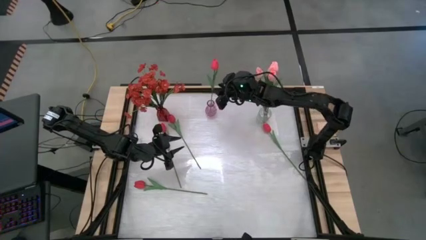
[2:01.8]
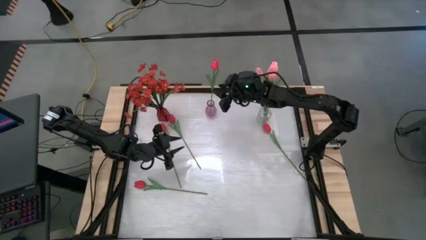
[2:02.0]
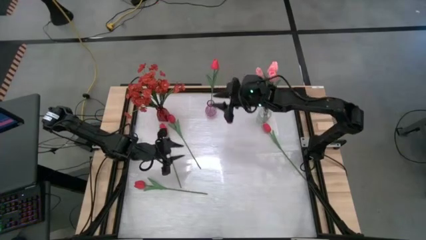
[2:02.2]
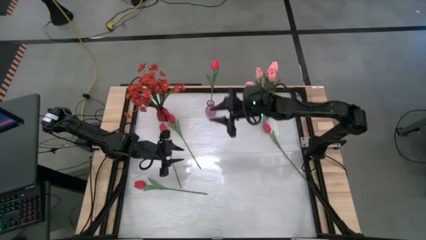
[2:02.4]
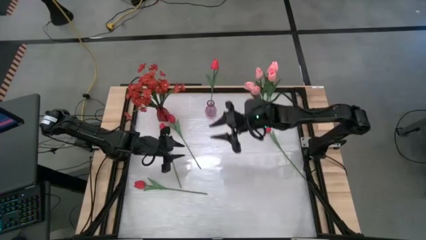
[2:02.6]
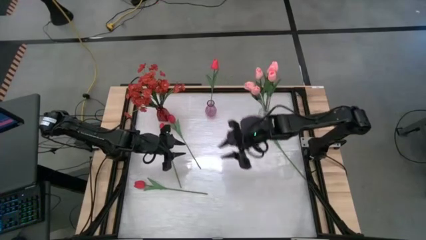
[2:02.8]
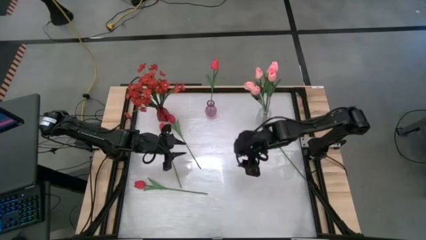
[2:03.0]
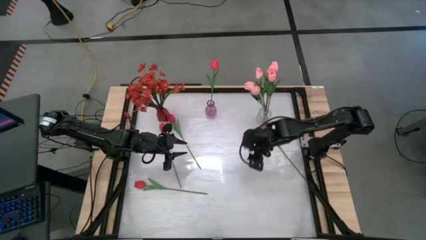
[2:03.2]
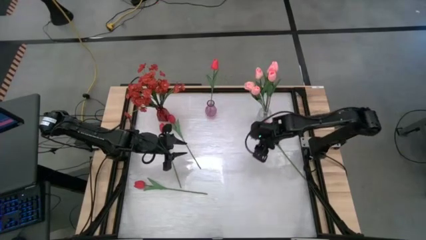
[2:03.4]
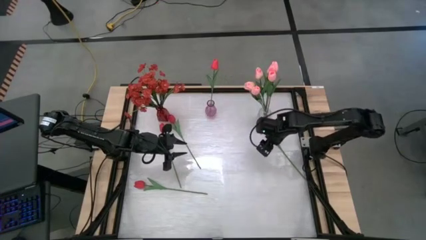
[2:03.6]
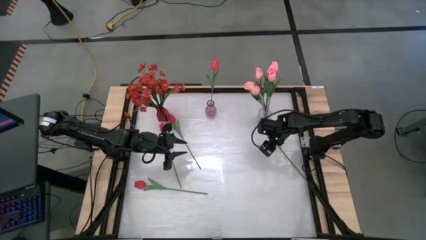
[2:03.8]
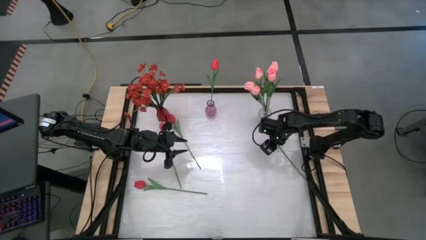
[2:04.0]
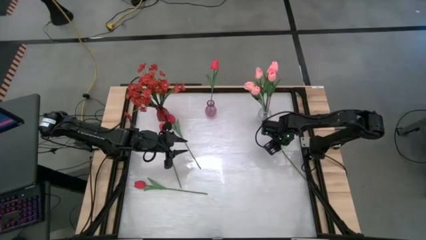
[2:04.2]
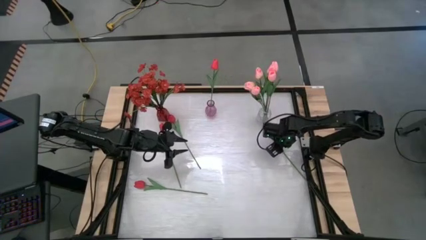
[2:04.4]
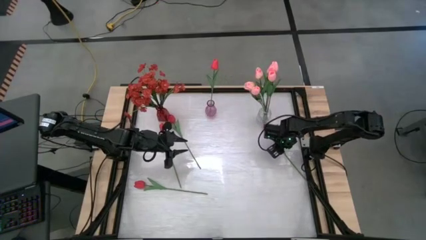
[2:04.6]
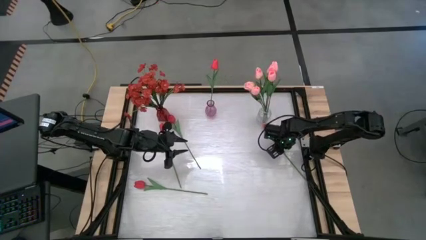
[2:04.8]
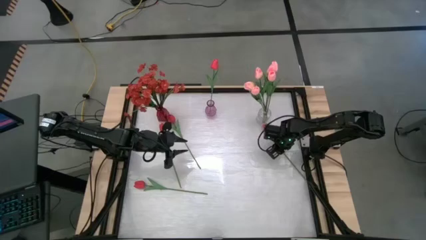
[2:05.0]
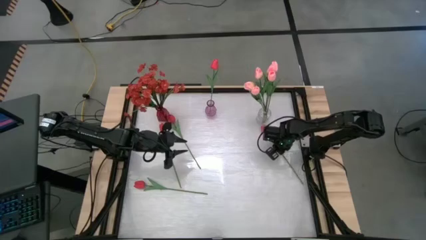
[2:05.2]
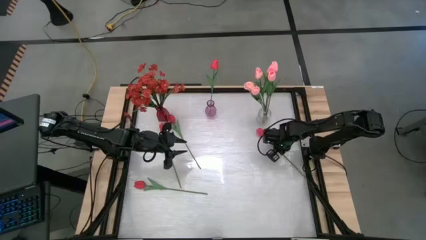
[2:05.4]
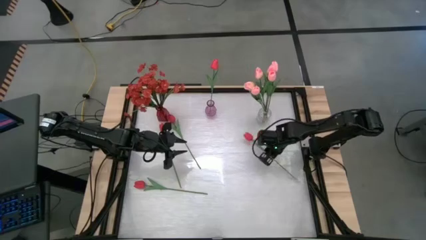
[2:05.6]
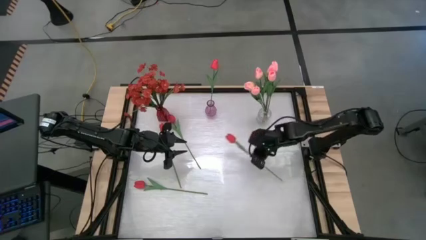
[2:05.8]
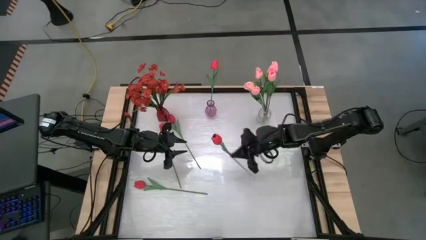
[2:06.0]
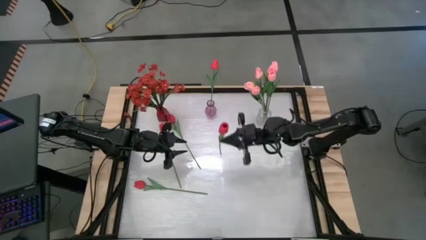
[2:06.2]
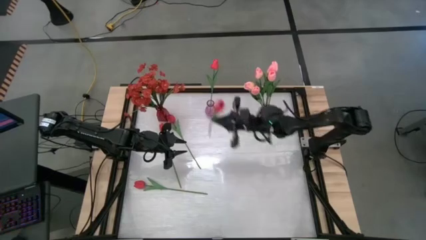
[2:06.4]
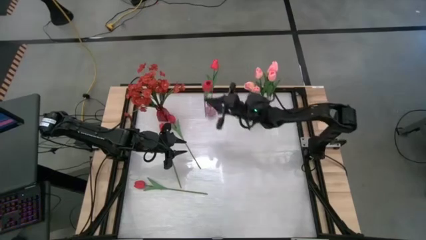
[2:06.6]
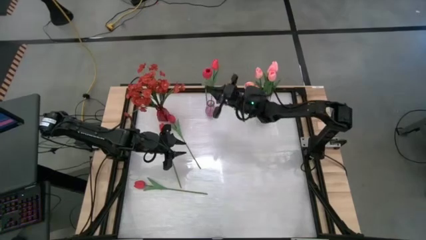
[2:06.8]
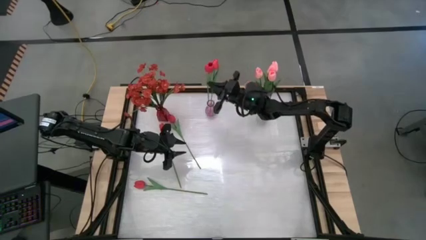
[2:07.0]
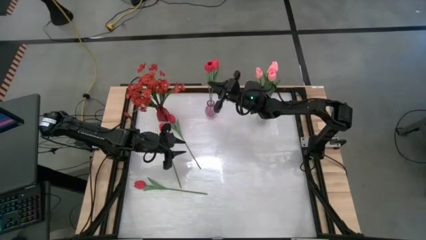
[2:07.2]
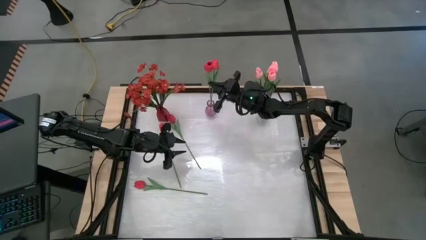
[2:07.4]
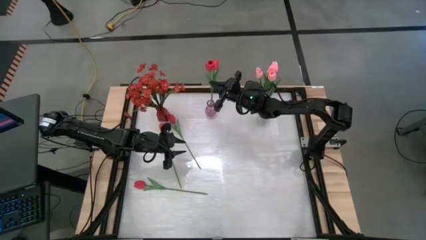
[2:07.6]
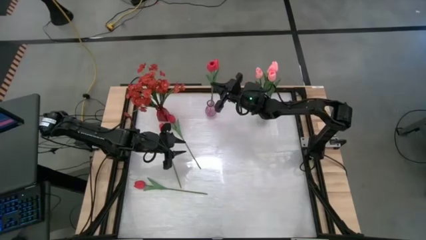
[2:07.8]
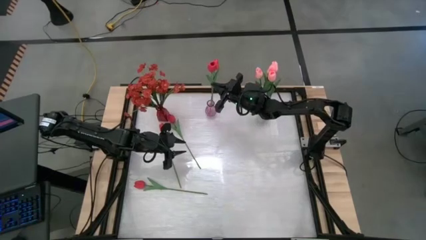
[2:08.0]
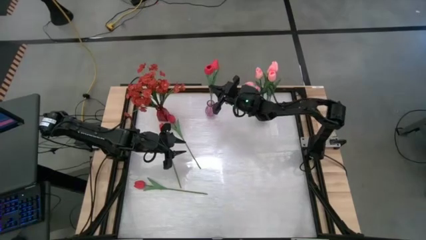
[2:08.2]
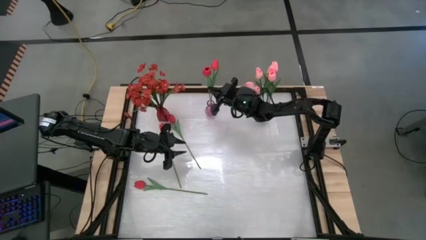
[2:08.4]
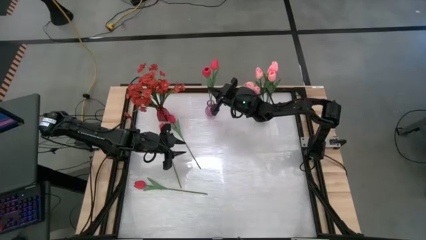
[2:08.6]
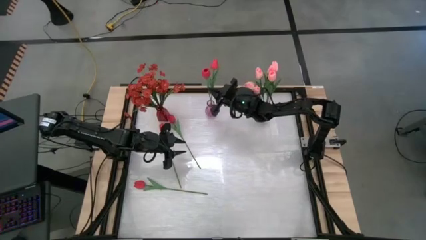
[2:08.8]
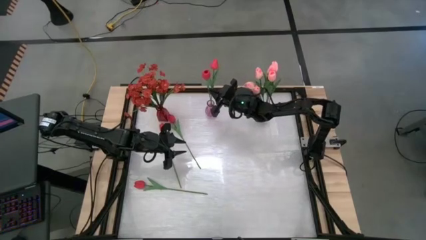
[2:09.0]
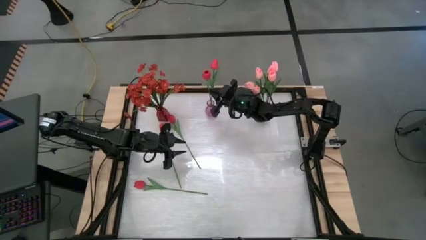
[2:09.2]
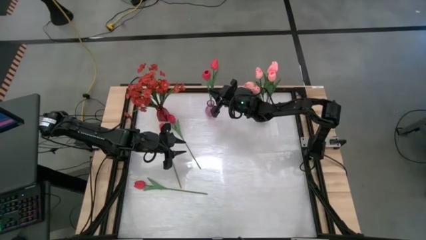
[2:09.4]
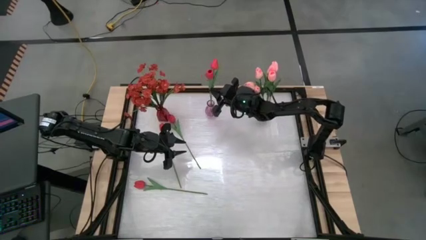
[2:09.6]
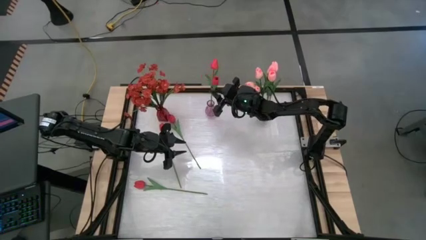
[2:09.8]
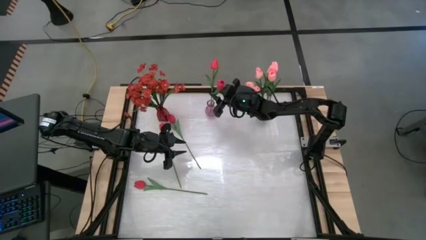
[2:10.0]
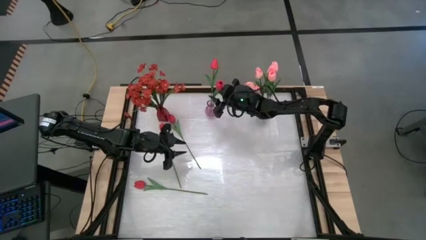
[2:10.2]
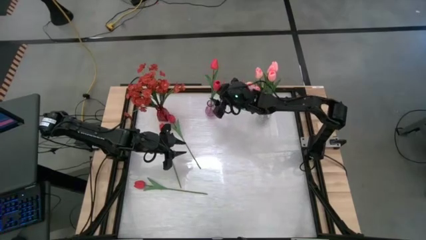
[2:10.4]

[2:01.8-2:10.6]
Task: Sort flowers into vase by color
Put the top right red tulip into the purple vase

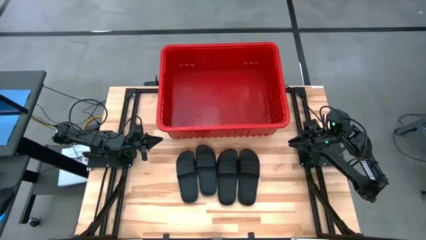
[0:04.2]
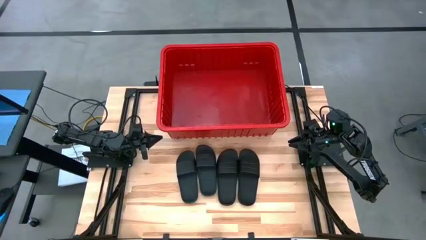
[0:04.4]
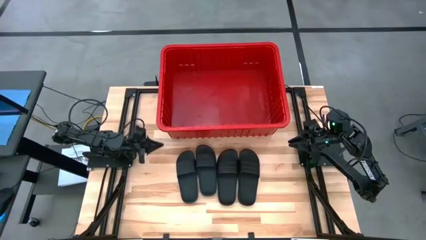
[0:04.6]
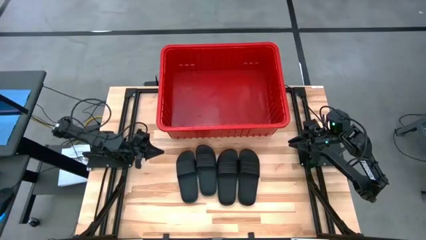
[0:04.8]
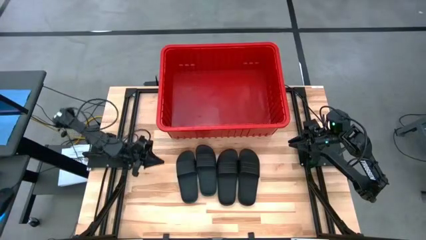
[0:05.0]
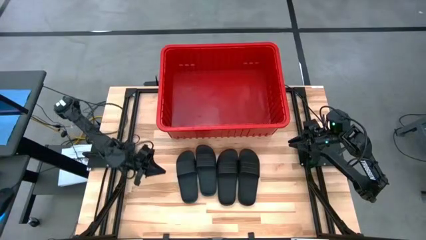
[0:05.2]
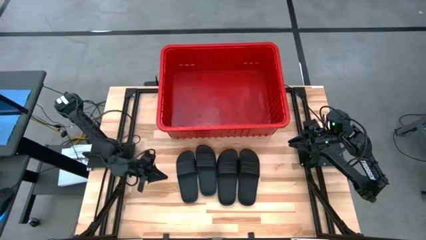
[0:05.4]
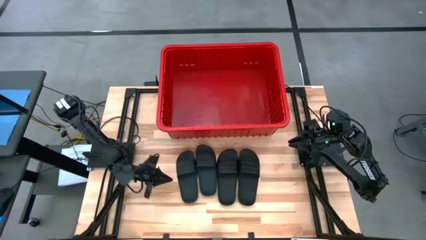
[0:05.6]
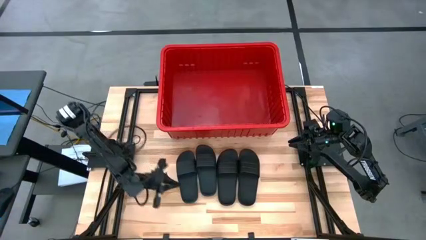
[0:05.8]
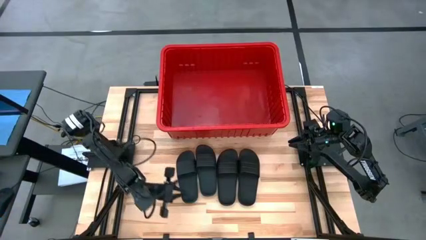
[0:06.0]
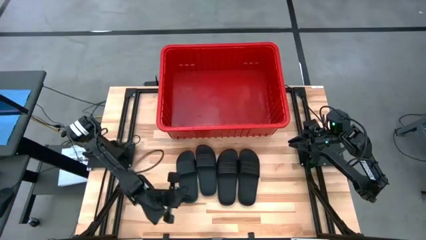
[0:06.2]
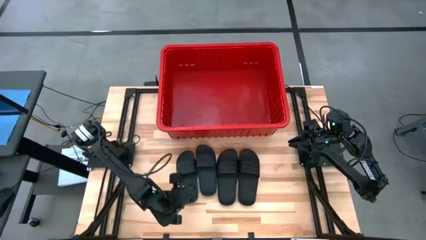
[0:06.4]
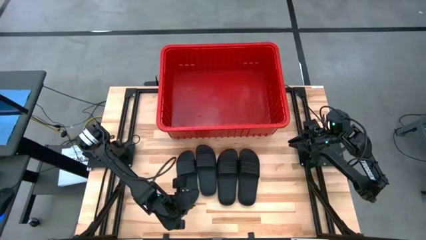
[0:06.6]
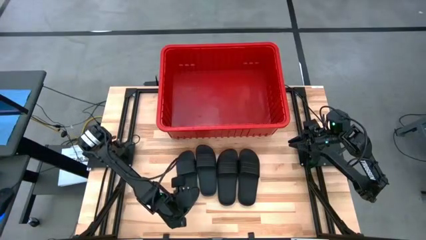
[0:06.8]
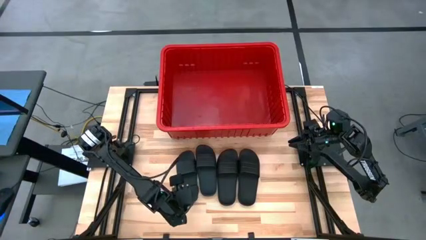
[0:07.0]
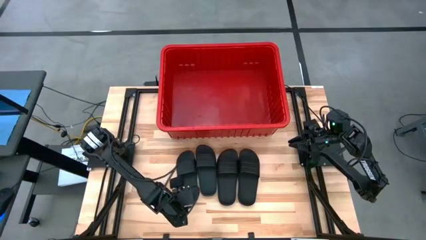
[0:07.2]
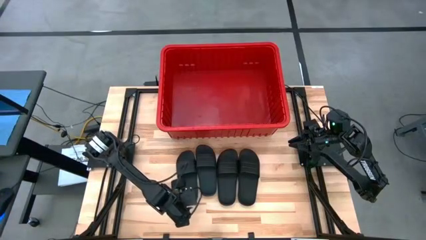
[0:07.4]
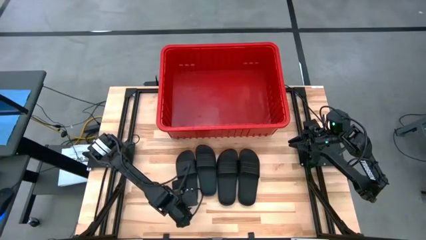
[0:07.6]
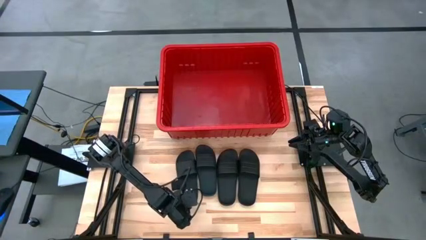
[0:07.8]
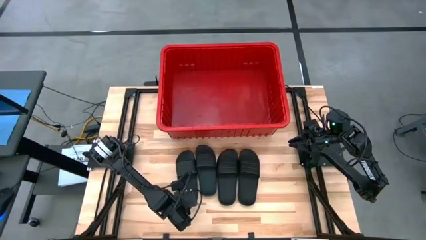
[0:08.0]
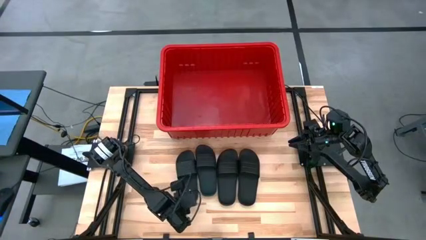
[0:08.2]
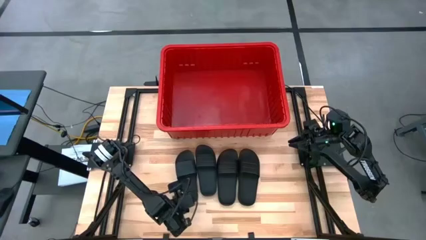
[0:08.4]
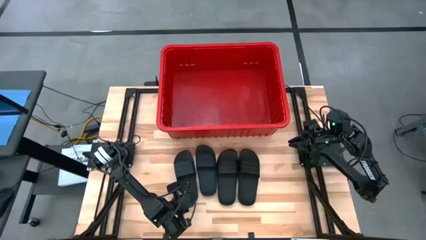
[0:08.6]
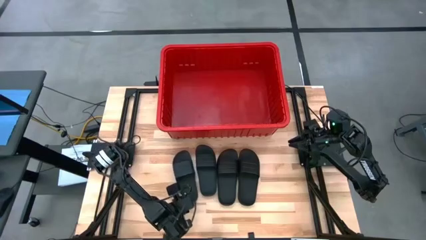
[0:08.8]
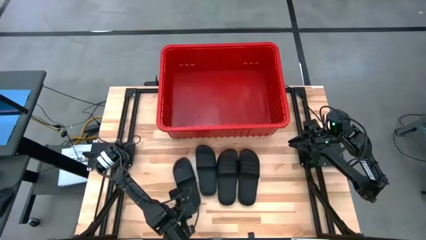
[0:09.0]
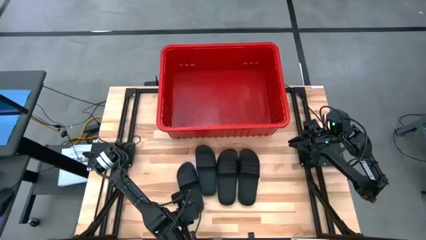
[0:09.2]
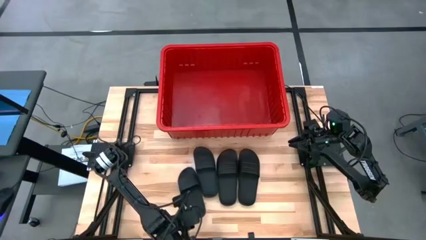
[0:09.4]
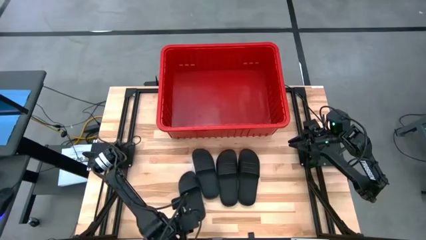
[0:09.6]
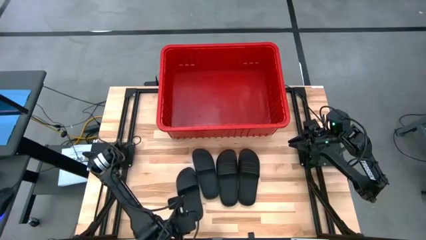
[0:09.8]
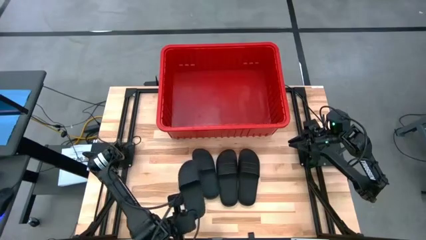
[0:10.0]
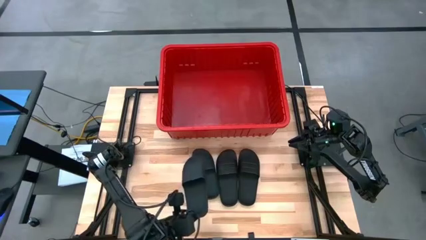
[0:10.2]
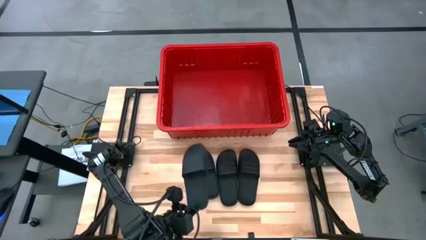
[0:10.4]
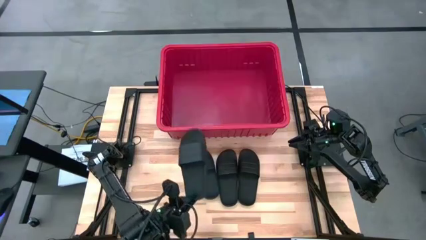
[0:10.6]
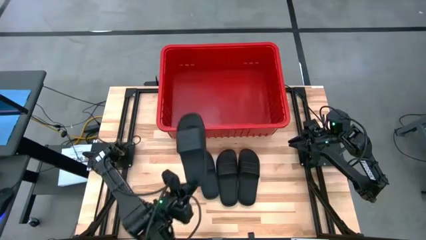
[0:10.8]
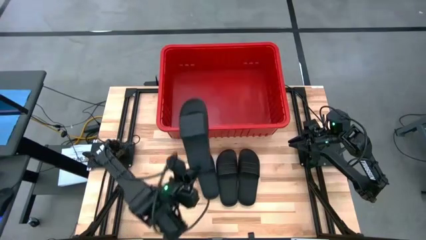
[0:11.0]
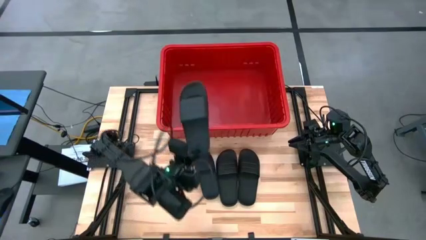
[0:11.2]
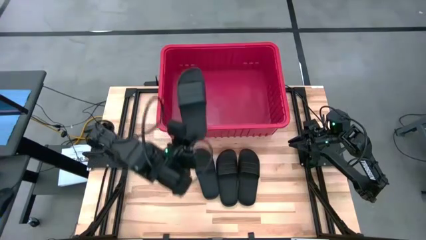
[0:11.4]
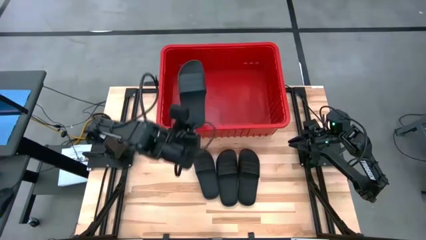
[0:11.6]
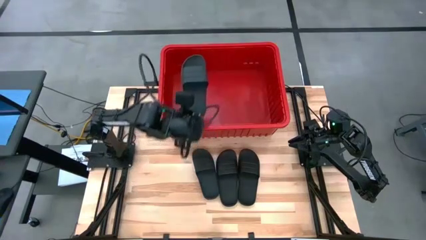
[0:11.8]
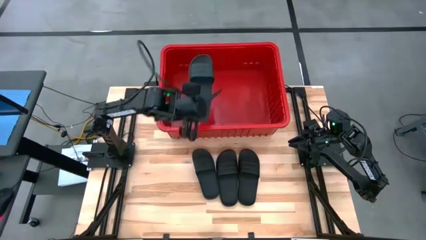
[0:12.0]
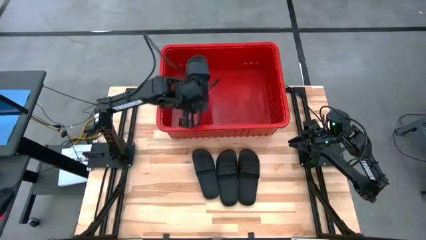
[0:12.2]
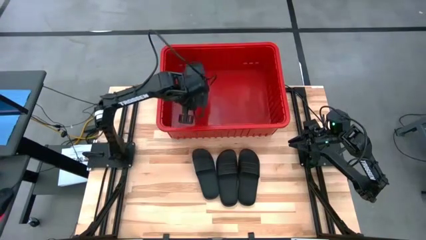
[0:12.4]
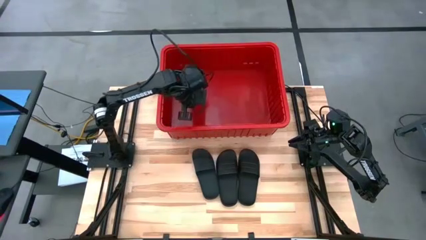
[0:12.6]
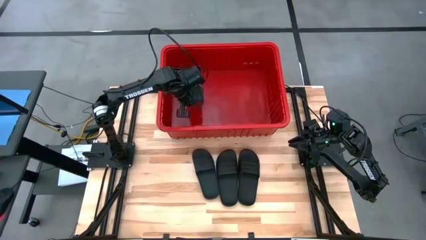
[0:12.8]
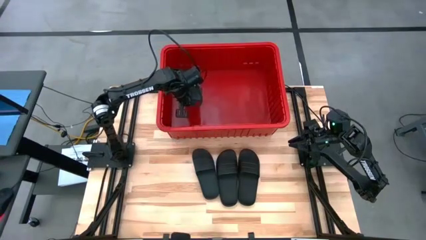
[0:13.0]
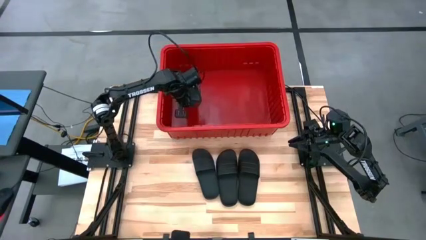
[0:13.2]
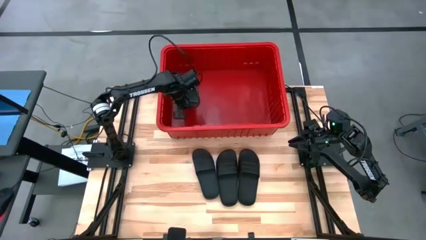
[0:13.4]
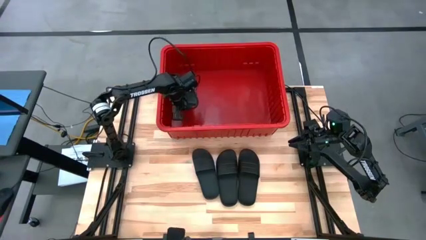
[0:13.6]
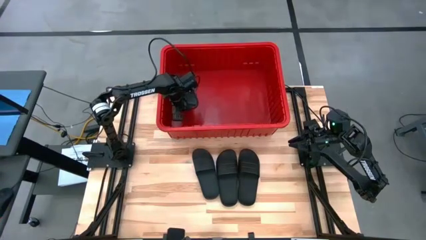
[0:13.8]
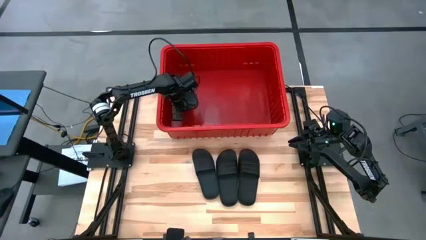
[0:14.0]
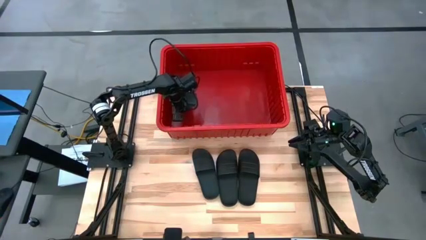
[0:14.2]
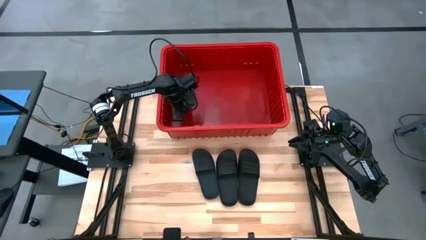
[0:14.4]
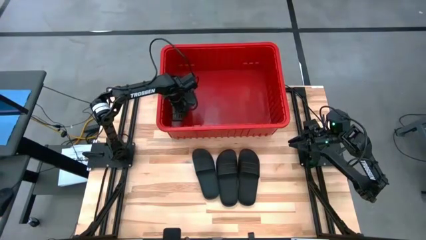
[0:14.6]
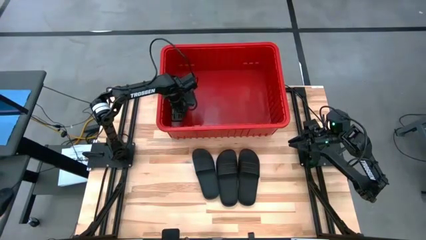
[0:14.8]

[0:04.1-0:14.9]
Task: Pick and place slides into bin
Put the left slide into the bin
